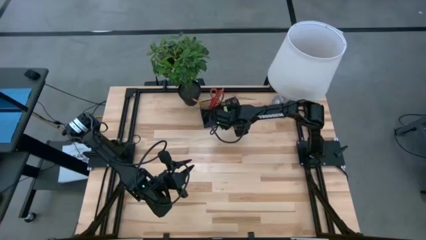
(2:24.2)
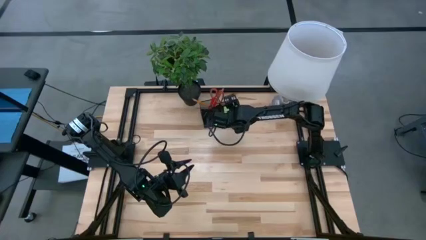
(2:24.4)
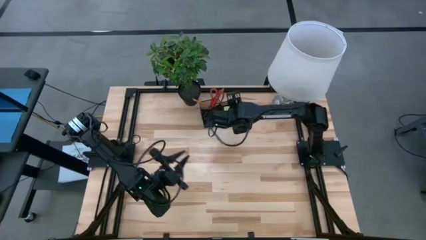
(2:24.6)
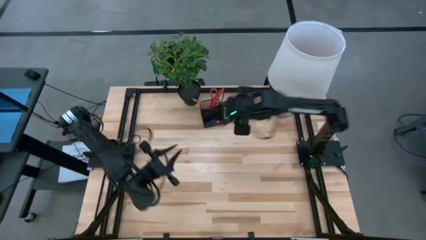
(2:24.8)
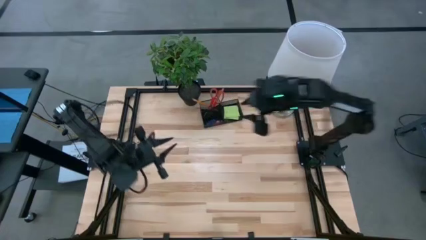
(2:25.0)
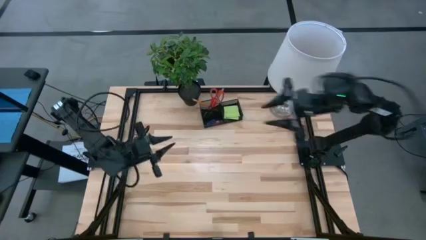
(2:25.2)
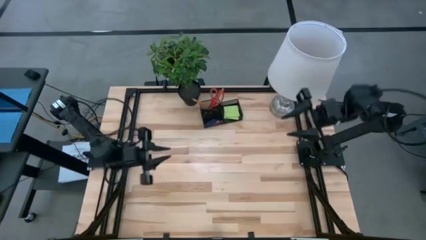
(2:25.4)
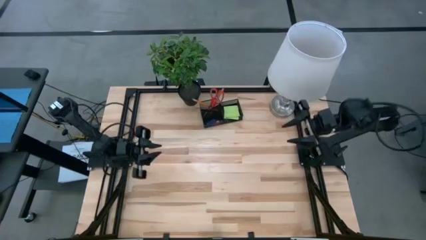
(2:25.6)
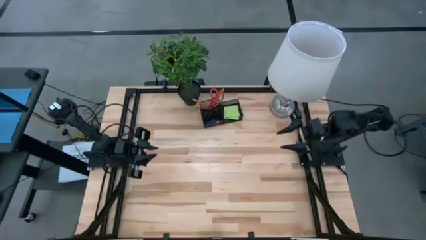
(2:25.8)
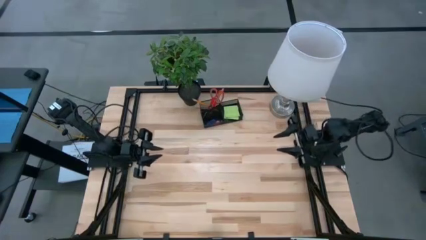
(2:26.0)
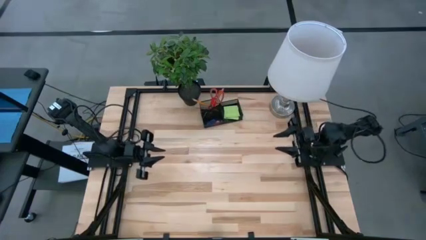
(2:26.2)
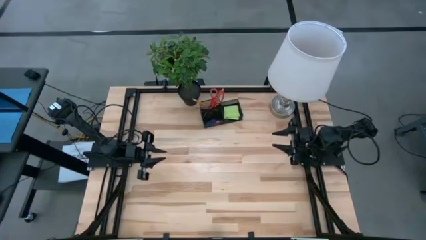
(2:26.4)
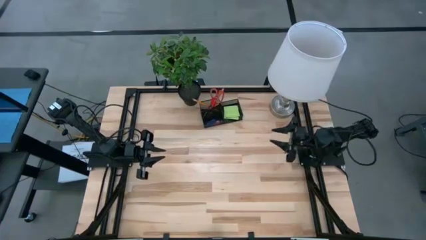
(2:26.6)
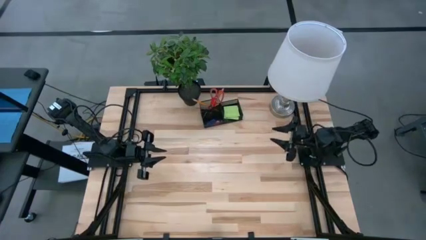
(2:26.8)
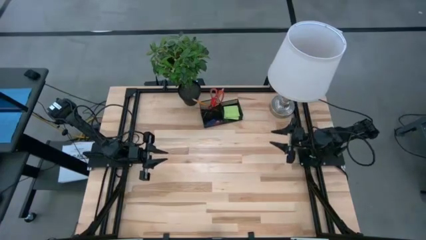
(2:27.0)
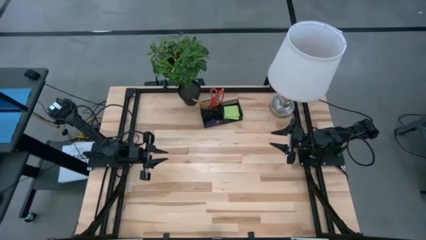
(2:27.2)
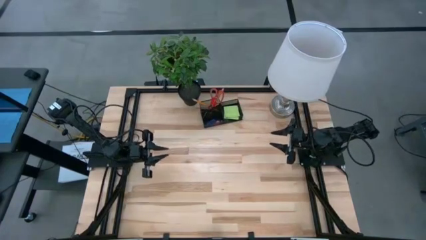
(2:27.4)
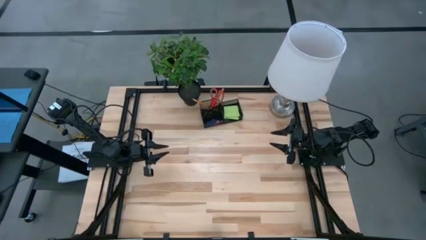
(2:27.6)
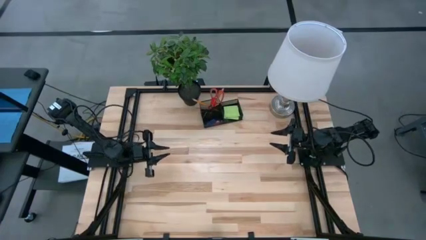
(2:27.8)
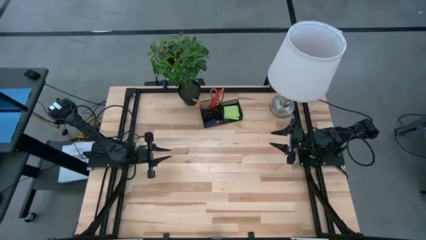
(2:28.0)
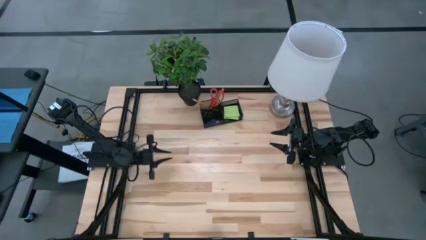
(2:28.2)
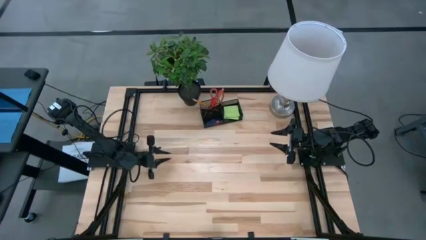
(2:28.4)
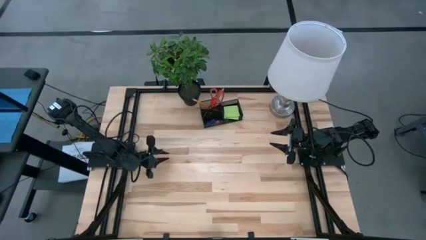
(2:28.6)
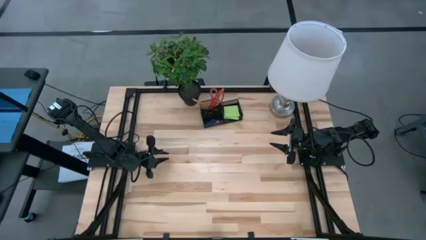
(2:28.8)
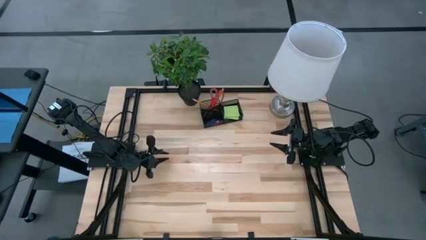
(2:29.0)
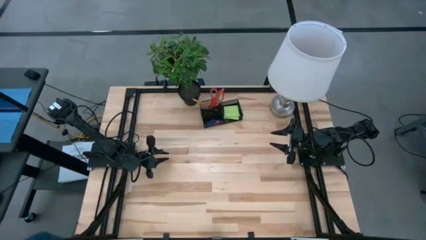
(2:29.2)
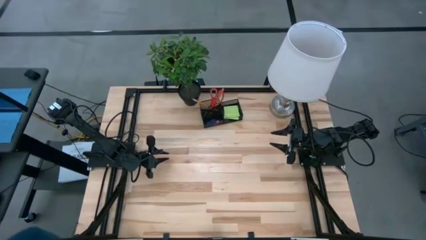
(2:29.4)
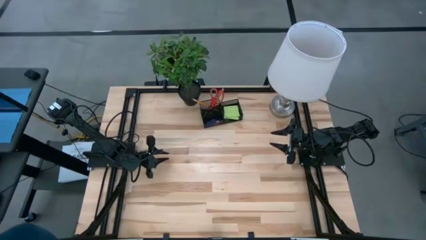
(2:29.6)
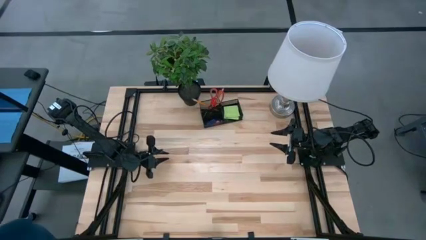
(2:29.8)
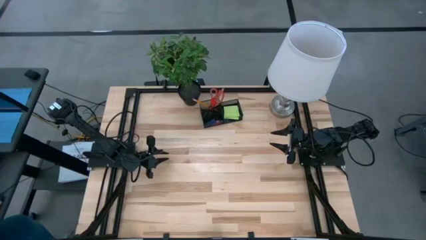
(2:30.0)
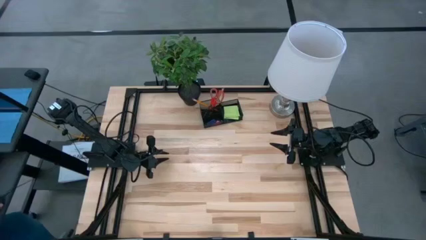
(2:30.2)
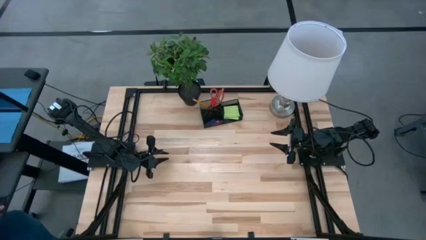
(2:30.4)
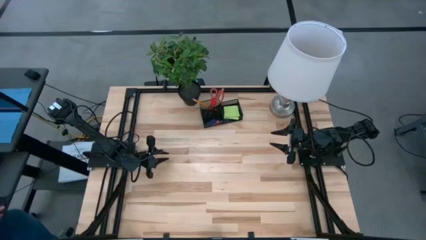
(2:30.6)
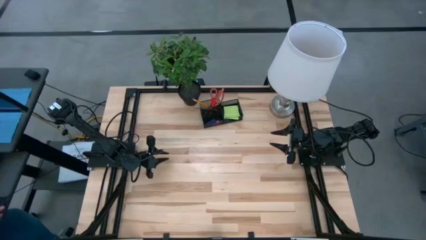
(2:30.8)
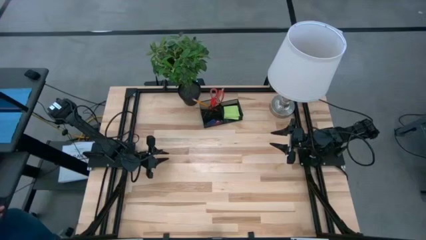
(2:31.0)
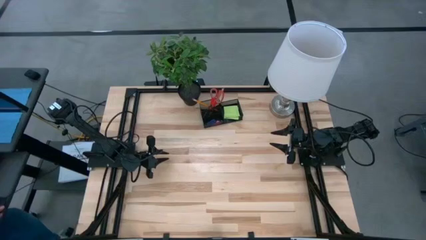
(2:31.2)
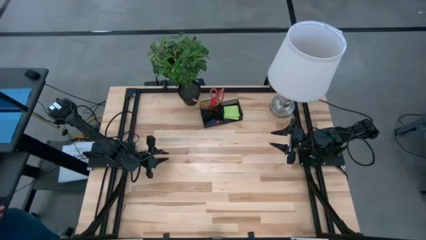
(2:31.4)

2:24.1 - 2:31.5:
Task: Pick and place office supplies into organizer
Return to Home Position

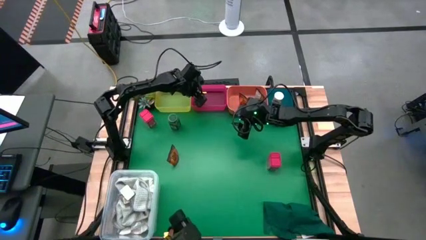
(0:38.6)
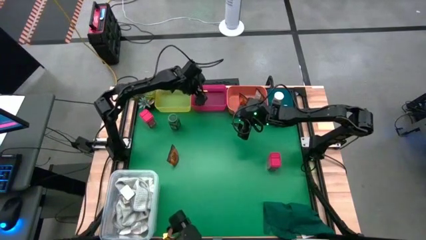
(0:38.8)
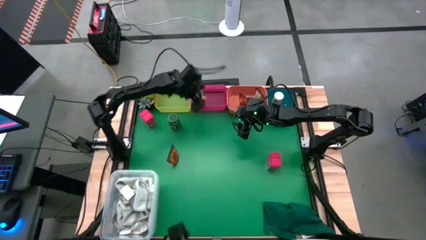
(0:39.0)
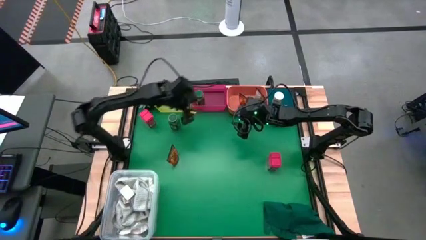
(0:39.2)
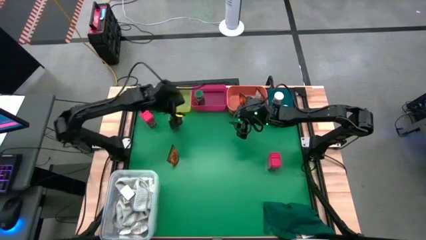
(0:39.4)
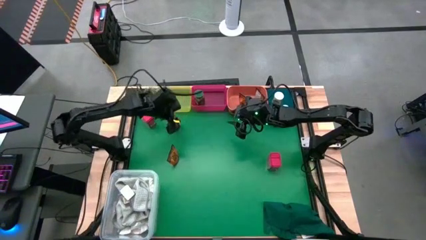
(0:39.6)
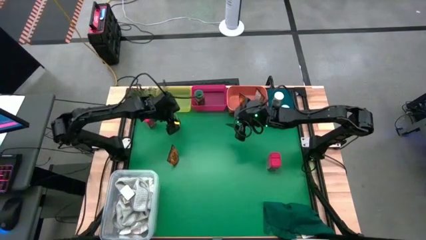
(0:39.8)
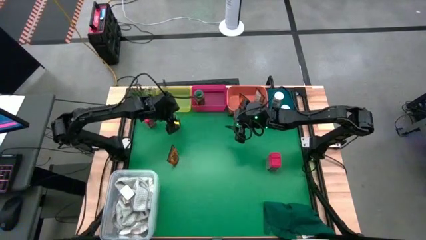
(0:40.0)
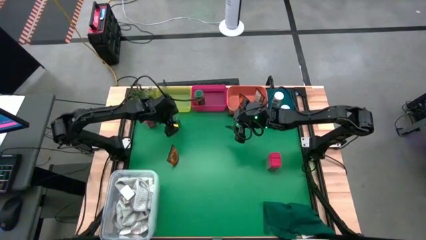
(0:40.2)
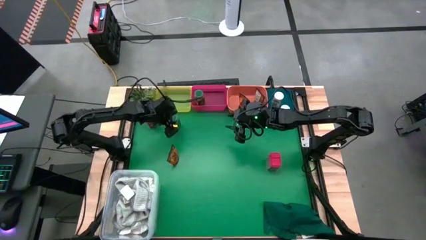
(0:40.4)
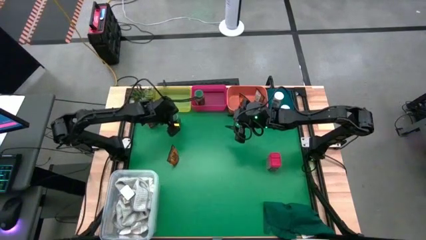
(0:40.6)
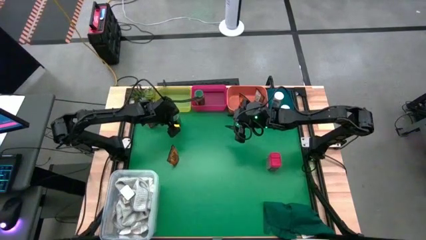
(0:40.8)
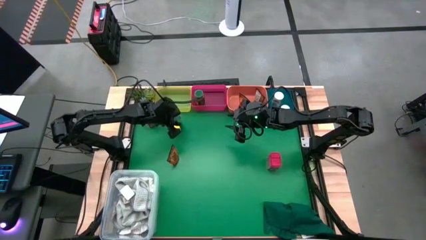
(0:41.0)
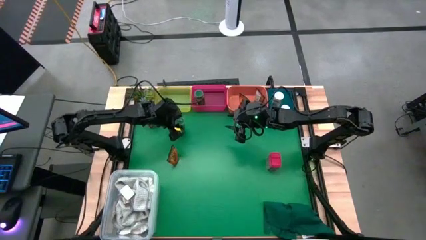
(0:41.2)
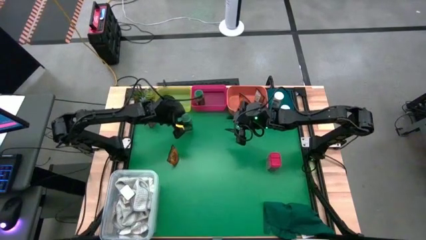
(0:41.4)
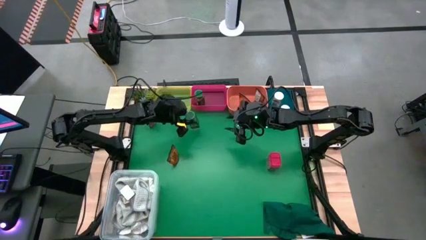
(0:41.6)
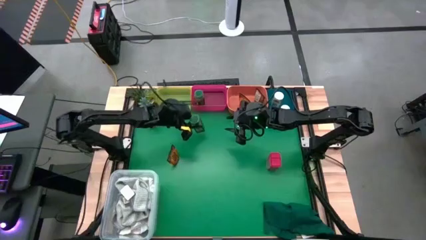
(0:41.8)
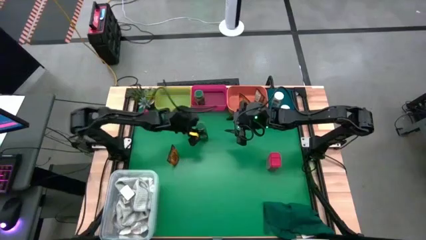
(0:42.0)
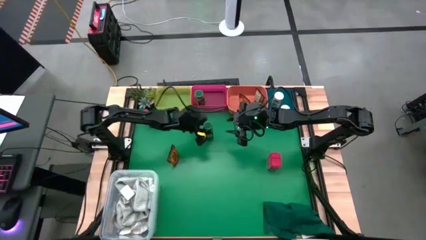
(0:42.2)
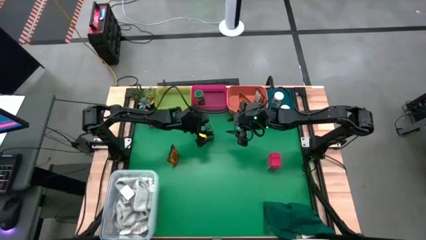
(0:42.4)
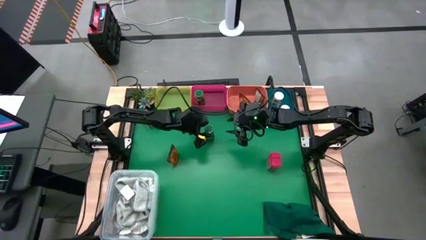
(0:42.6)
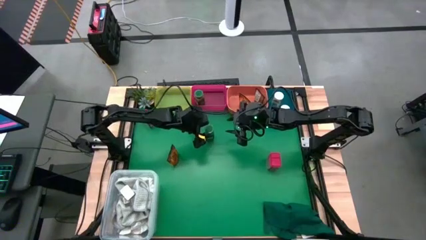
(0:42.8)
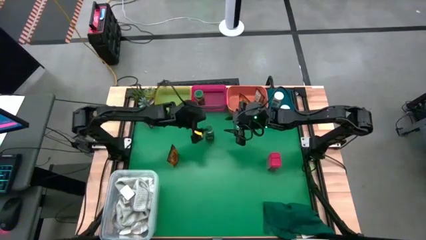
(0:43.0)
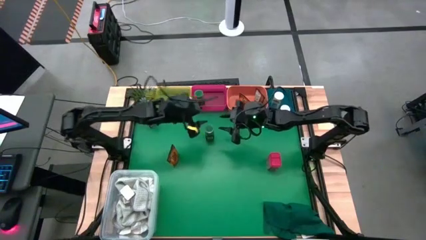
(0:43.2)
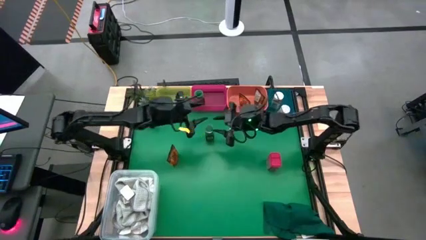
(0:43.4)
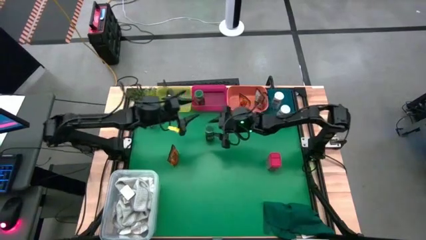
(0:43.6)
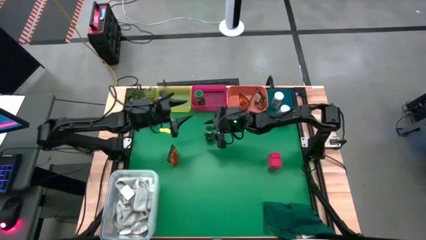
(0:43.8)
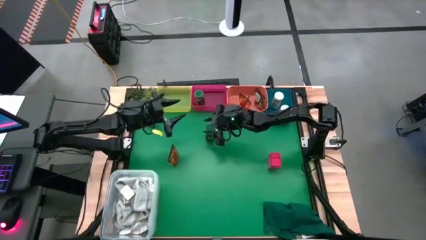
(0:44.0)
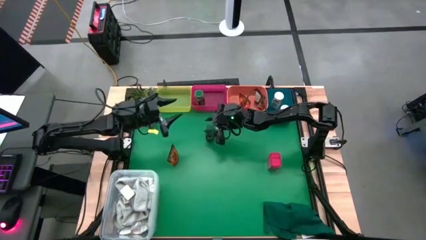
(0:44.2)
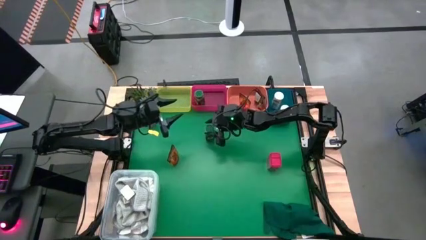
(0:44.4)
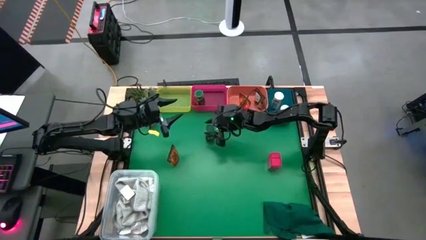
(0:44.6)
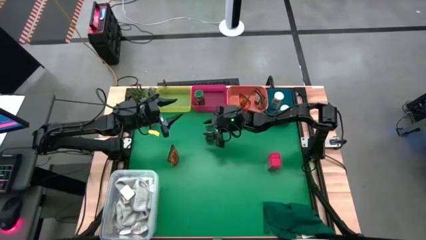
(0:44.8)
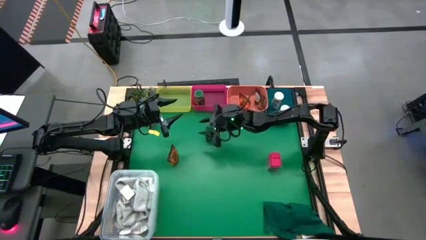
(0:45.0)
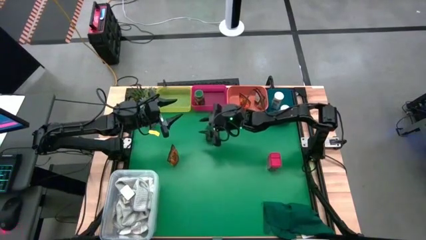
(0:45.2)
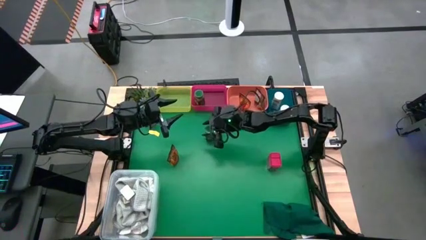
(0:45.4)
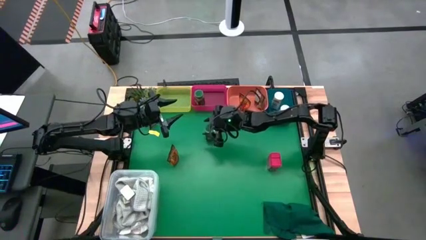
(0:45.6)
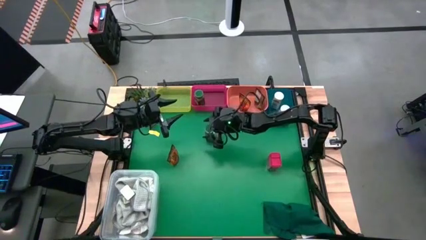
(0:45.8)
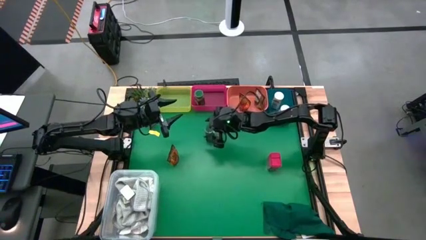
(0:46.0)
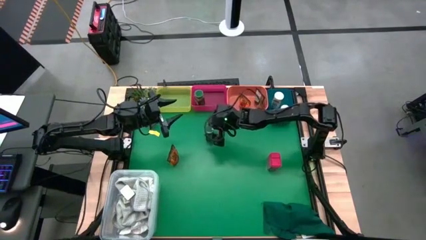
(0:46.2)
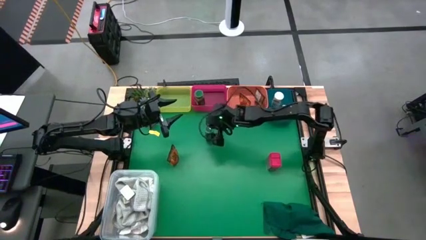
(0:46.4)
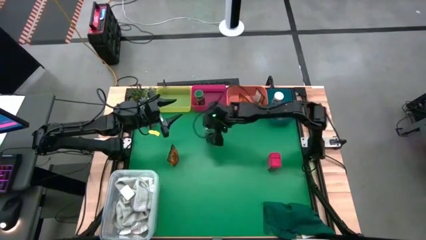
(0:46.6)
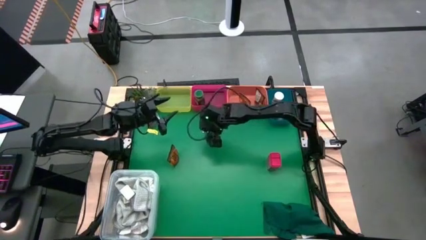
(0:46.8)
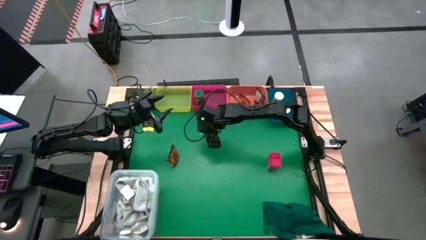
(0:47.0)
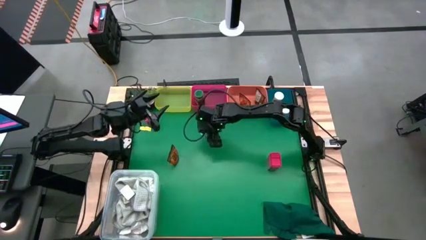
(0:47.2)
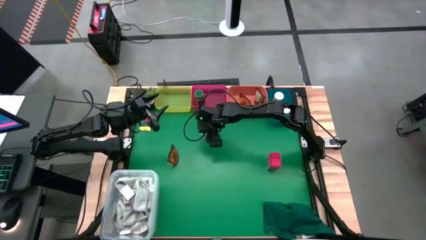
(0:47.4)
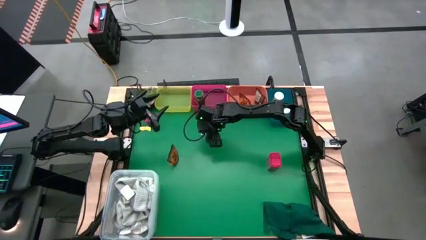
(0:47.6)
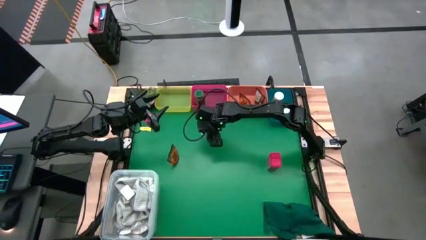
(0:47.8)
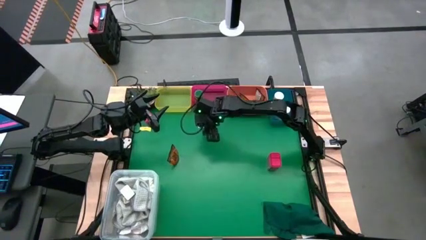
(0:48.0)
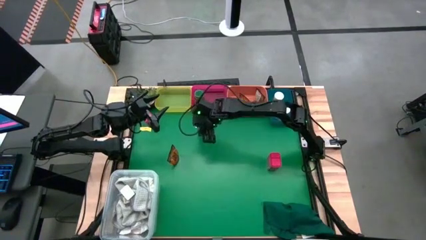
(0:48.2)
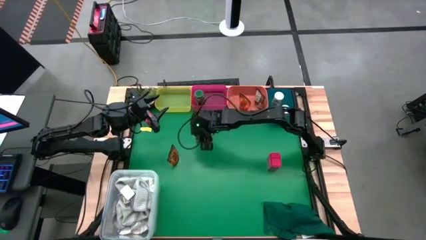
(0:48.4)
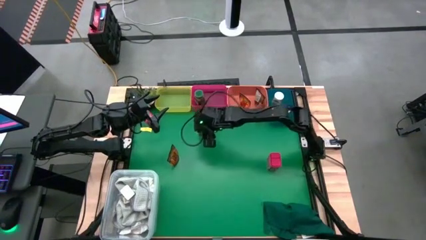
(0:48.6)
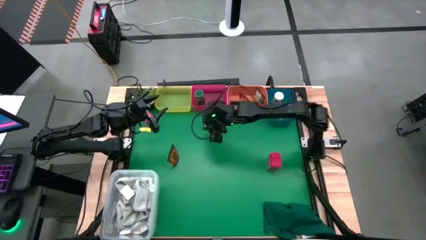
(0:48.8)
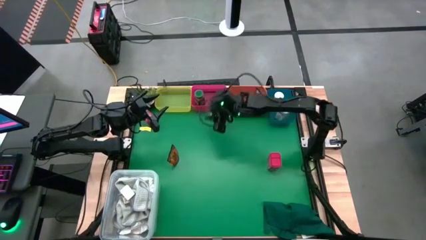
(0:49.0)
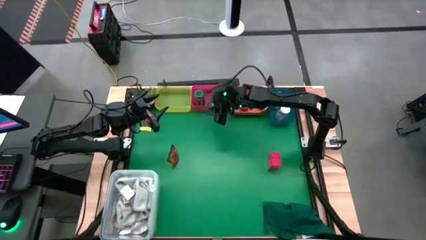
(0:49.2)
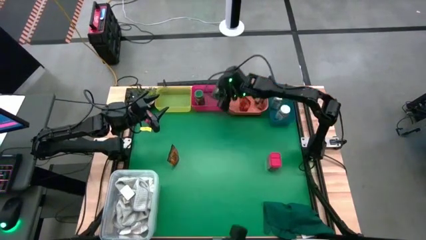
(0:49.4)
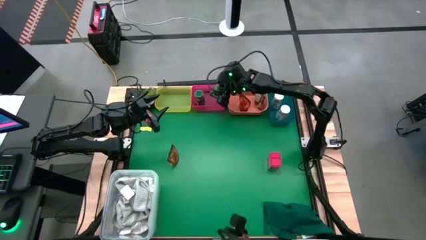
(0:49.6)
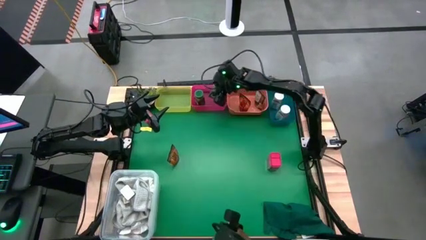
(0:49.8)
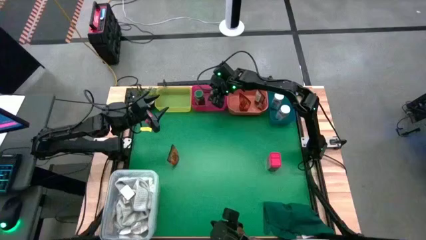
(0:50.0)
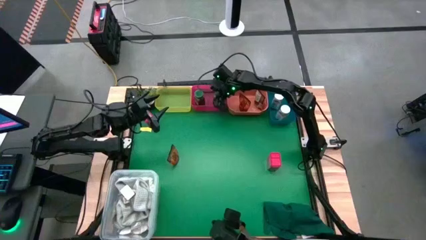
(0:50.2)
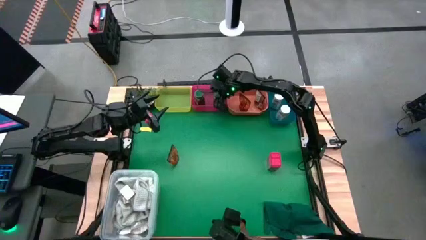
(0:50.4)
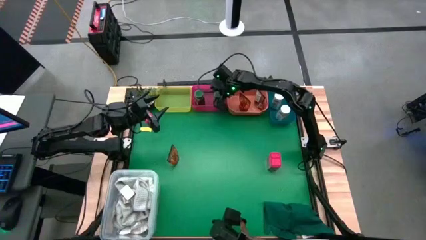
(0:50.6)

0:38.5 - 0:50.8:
Task: Sort spices by type
Put the green seasoning bottle into the red bin
